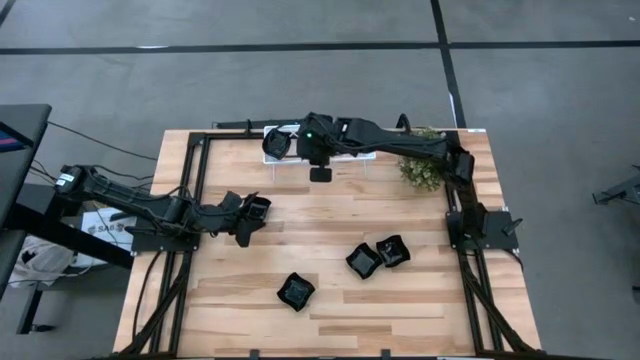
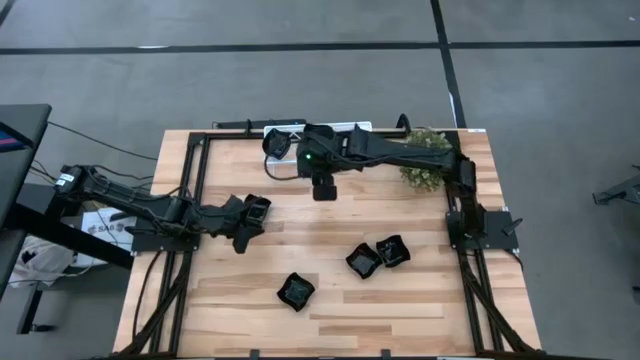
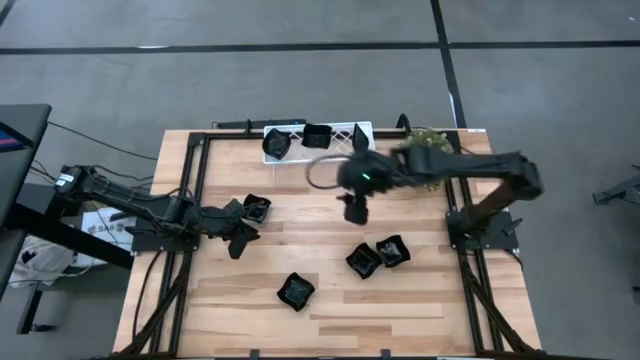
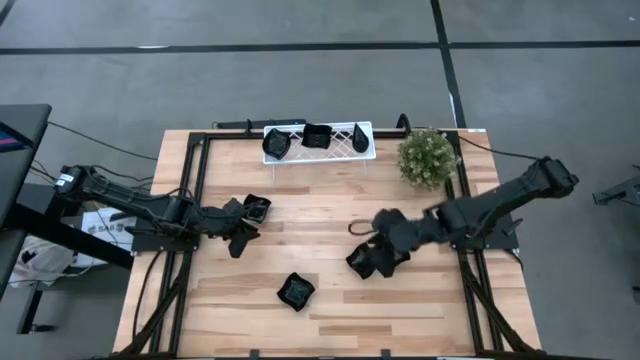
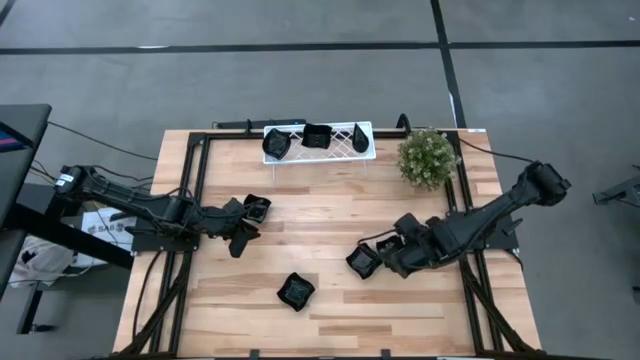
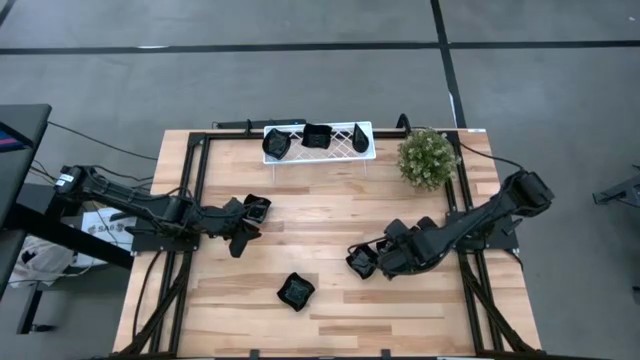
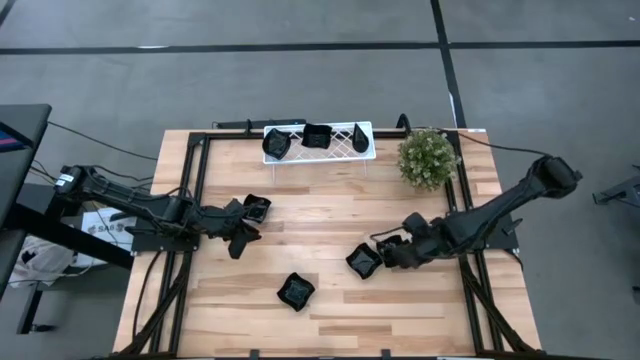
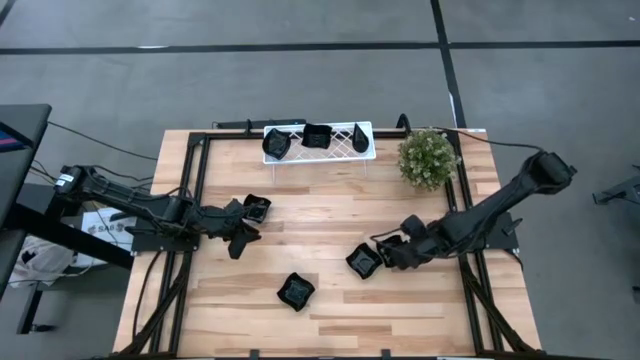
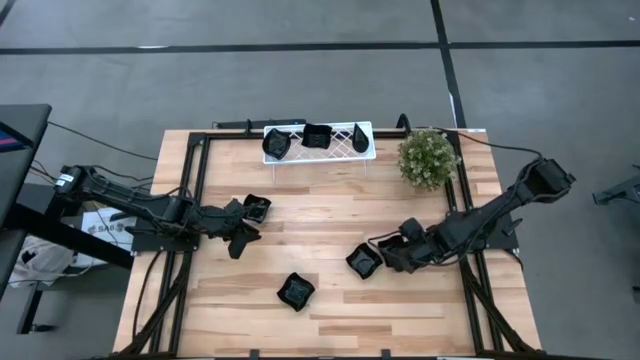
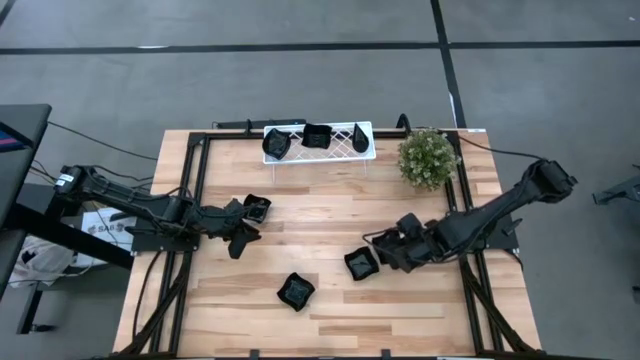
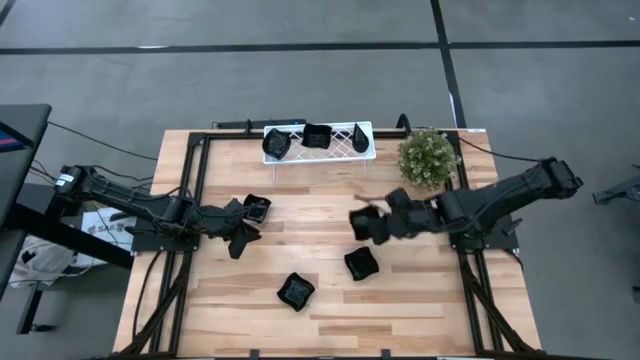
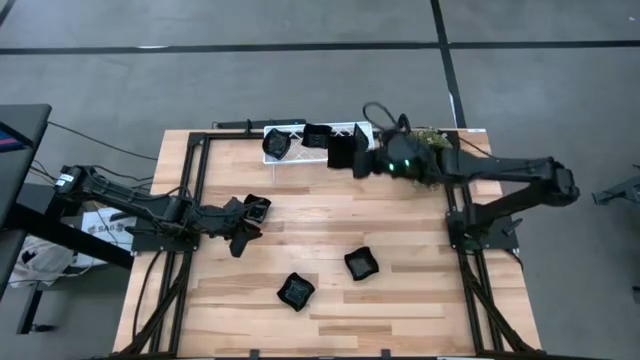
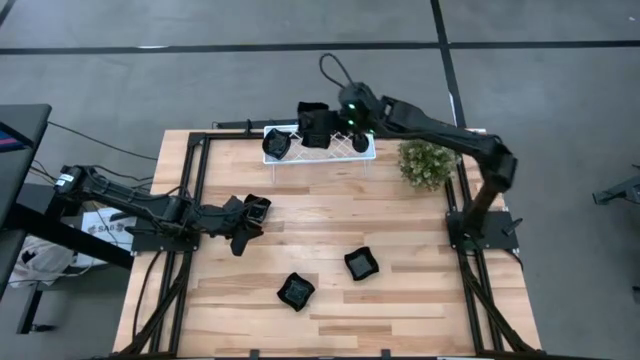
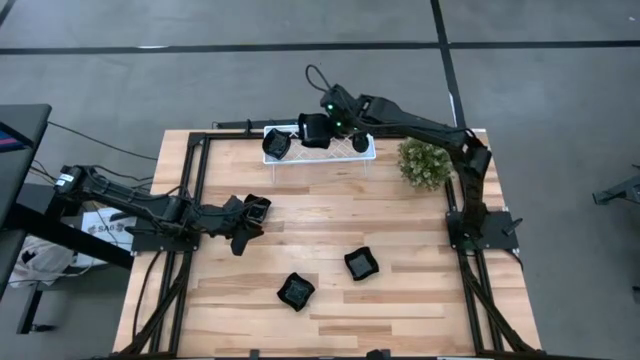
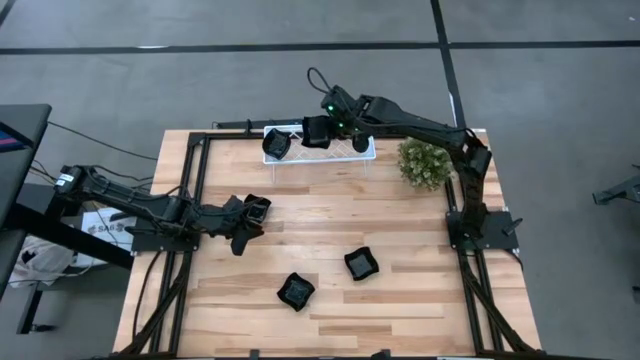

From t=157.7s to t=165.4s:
Task: Pick & Place Mini shaped plates
Stack the black distorted square plate on top of the black distorted square plate on the shelf

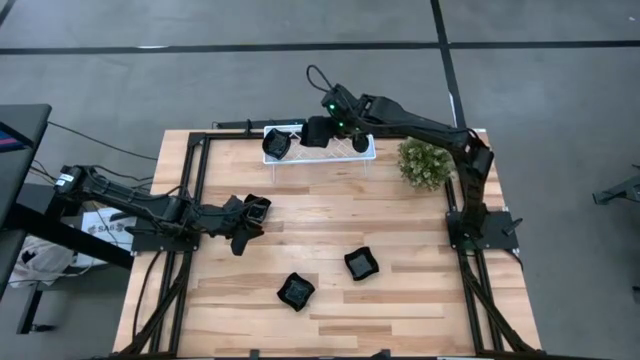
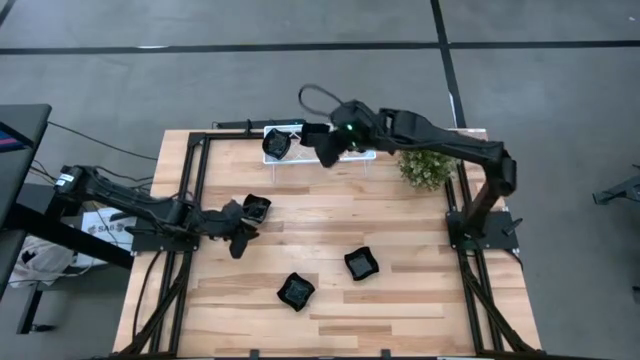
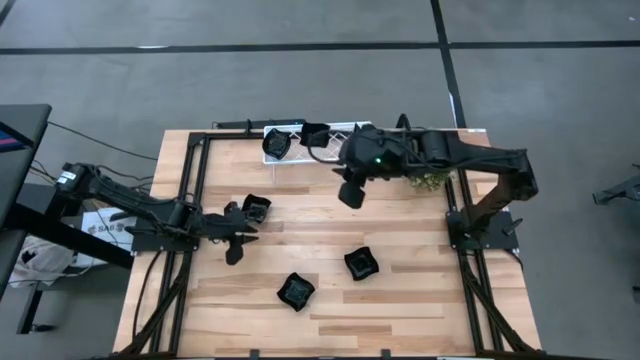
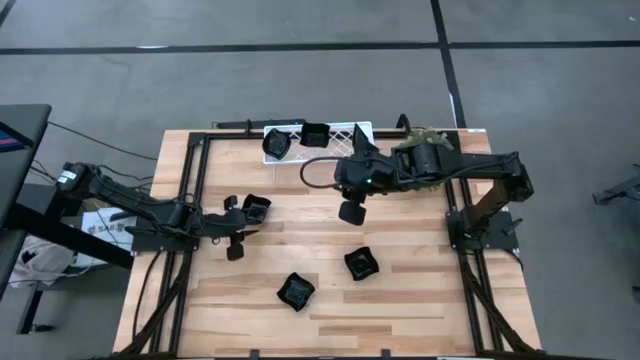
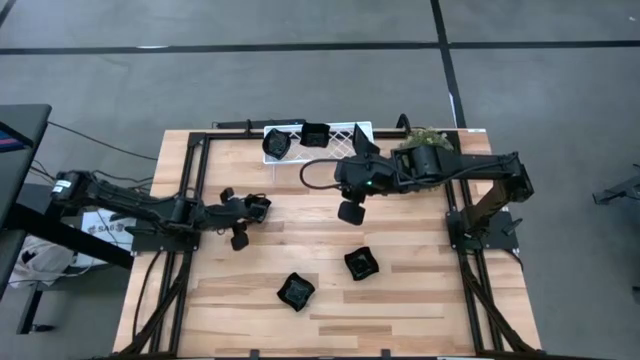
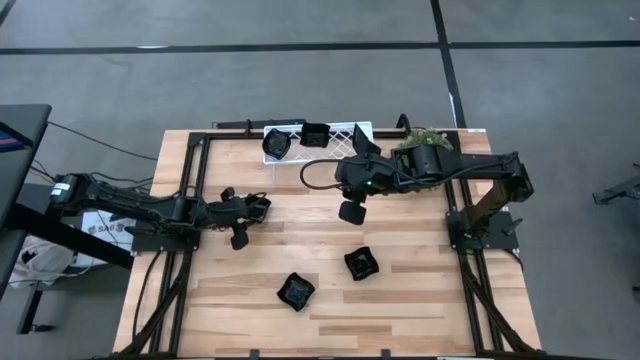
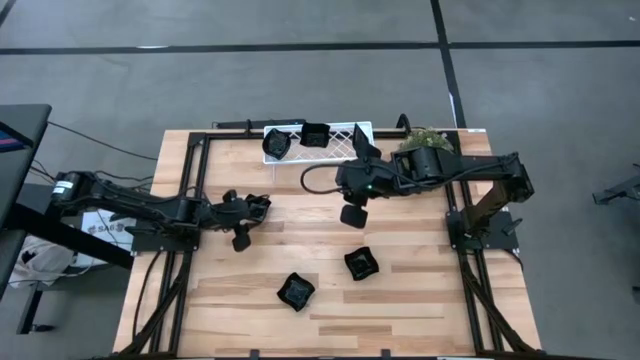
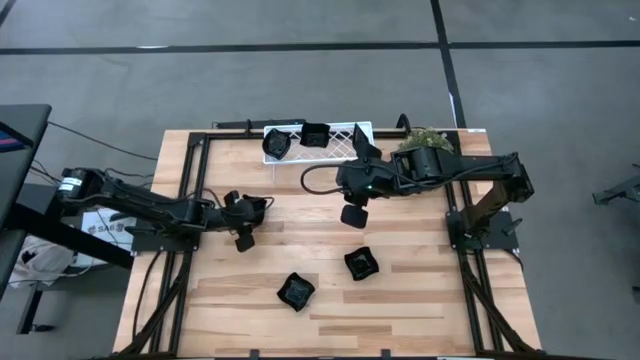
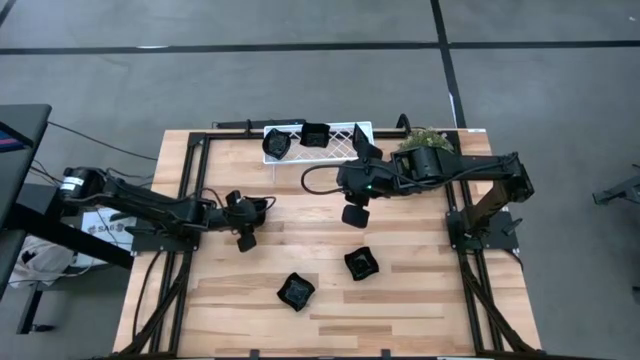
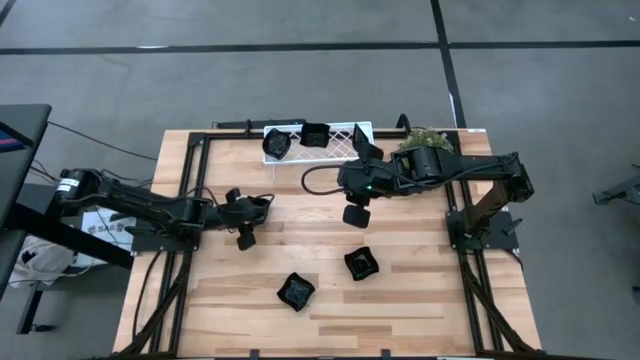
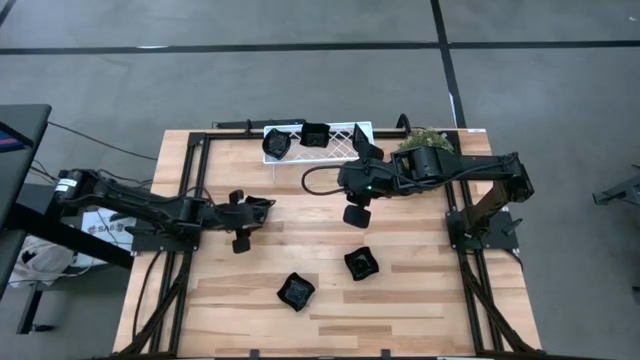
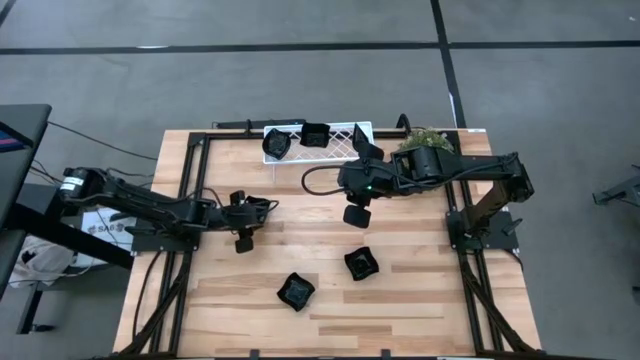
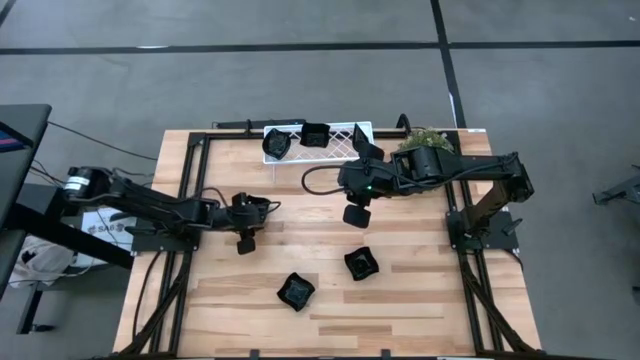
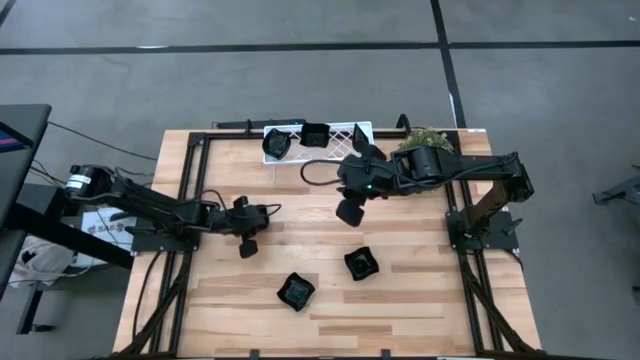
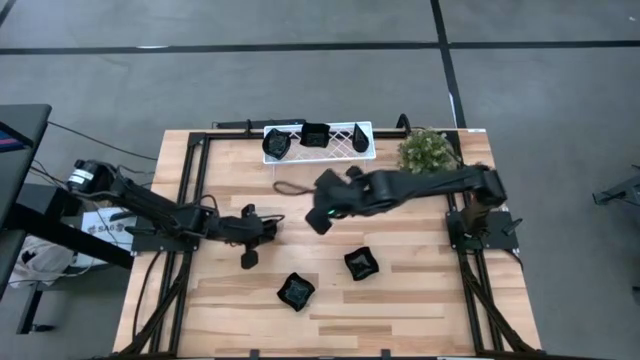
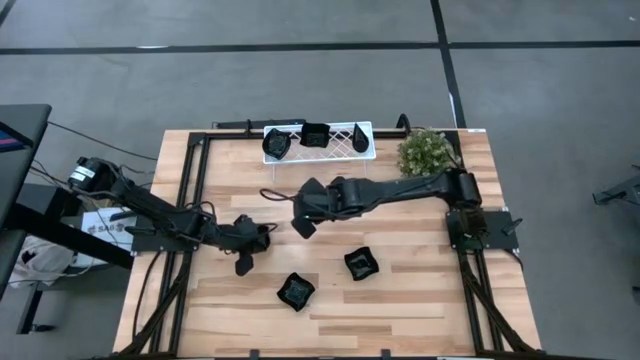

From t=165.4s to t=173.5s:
Stack the black distorted square plate on top of the black distorted square plate on the shelf

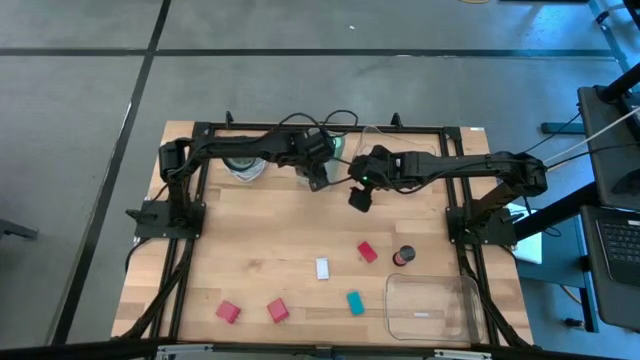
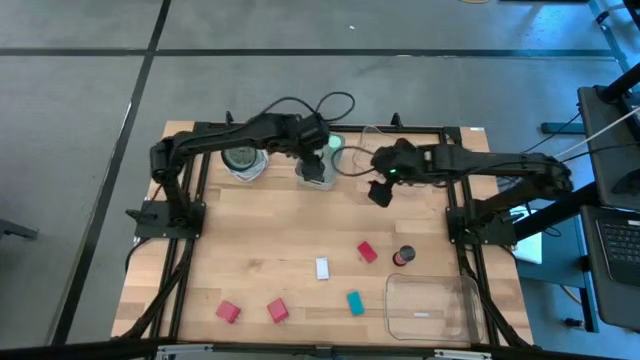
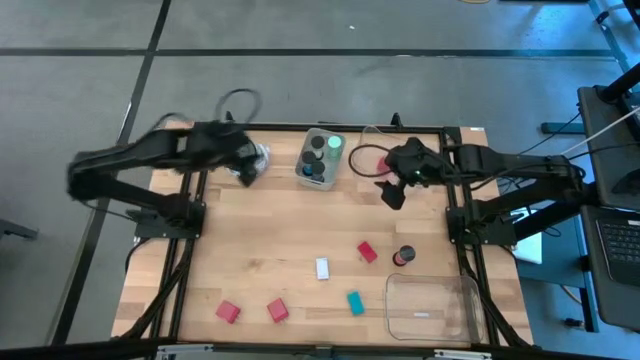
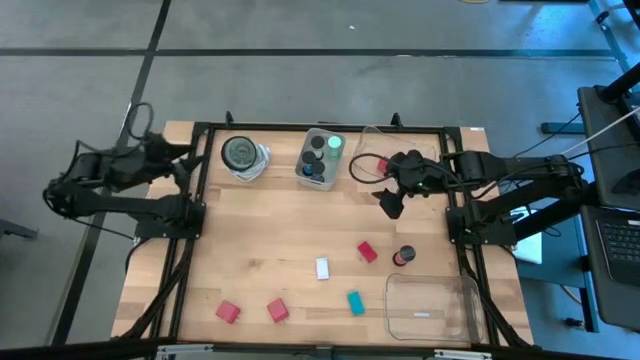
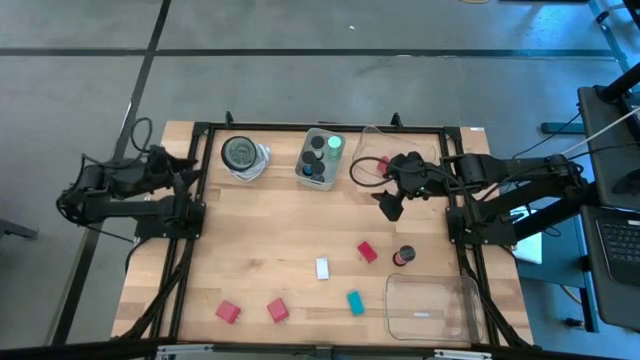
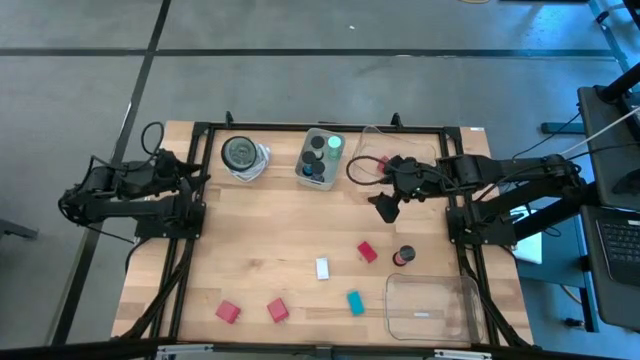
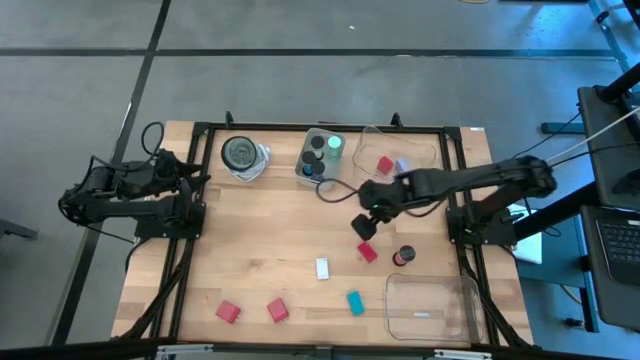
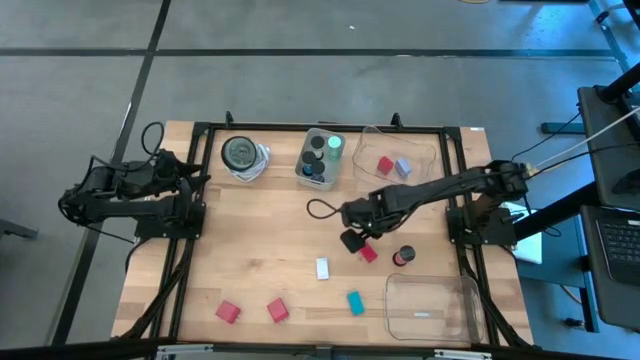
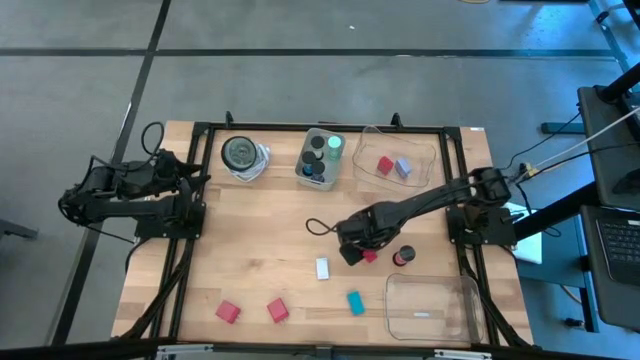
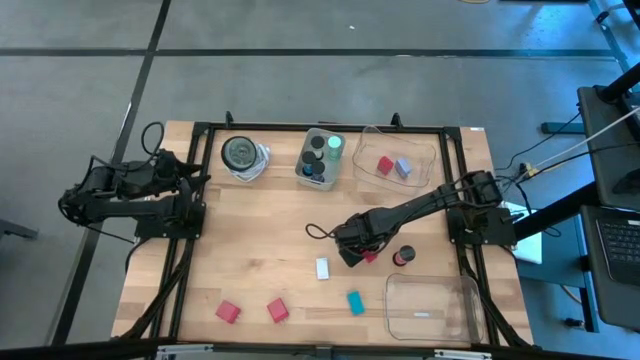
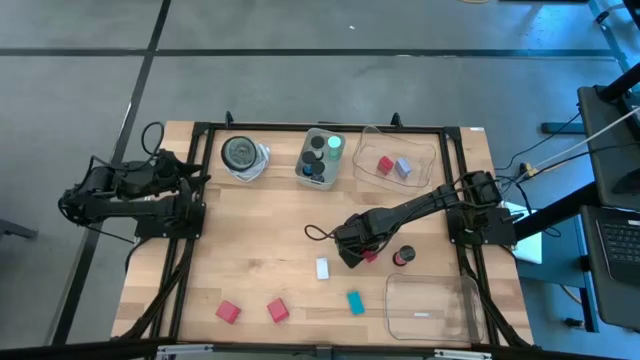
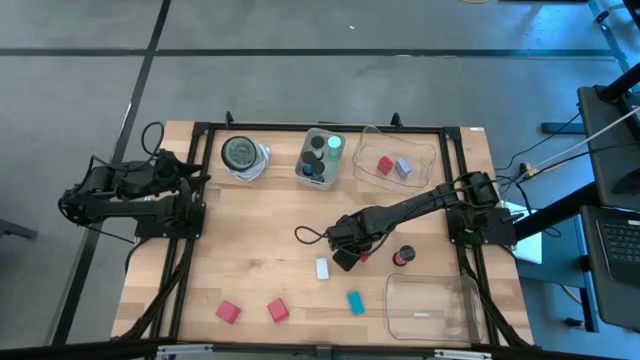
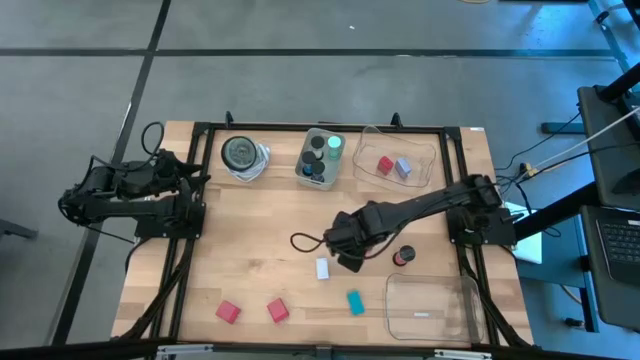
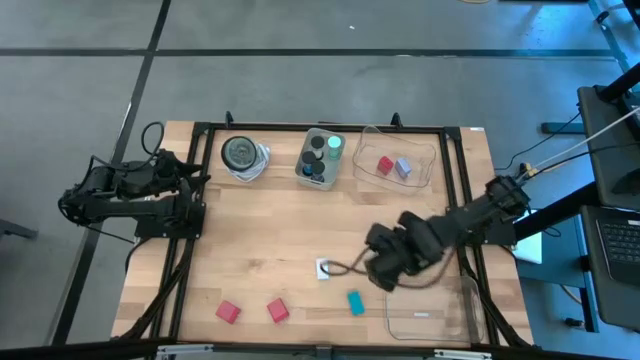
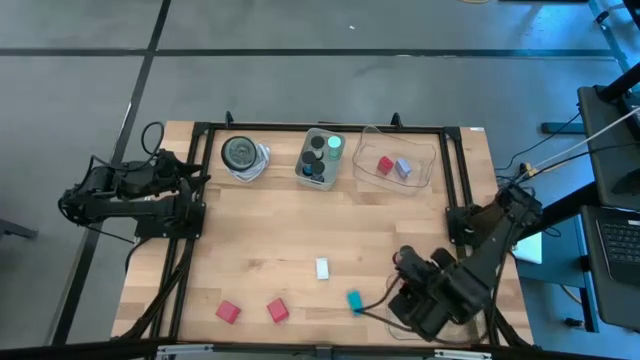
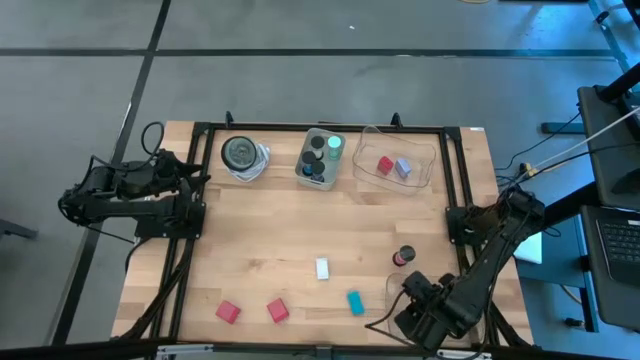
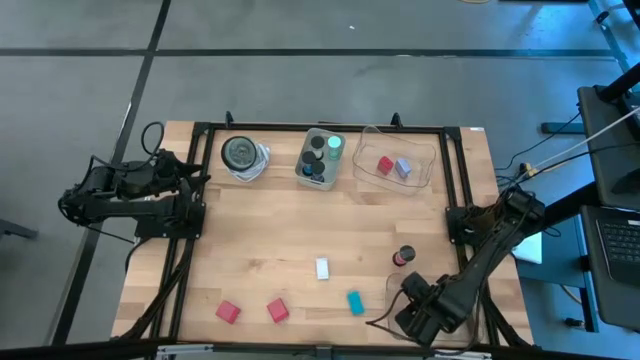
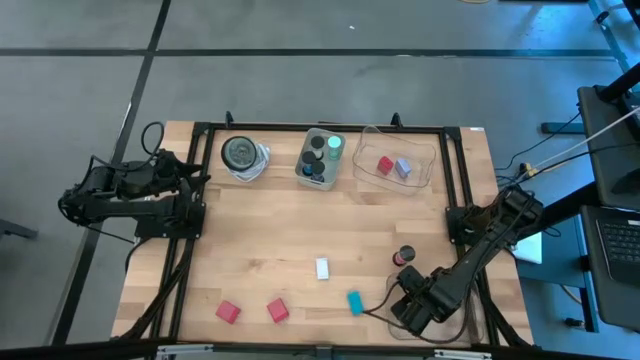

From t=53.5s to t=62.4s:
Task: Pick & Place Office items
Put the red digital timer into the bottom transparent bin
